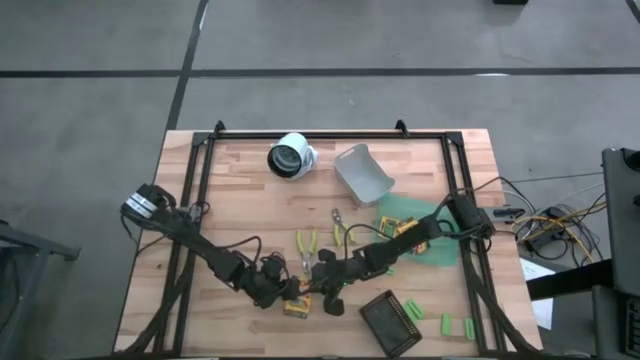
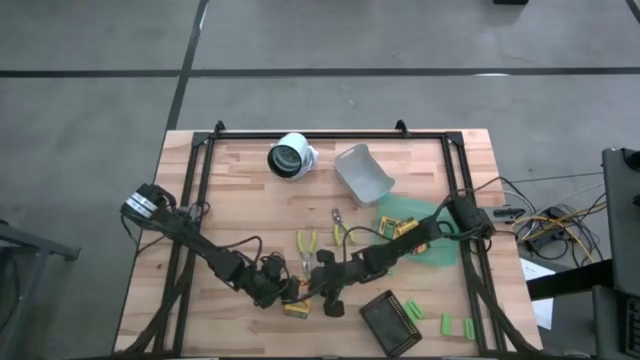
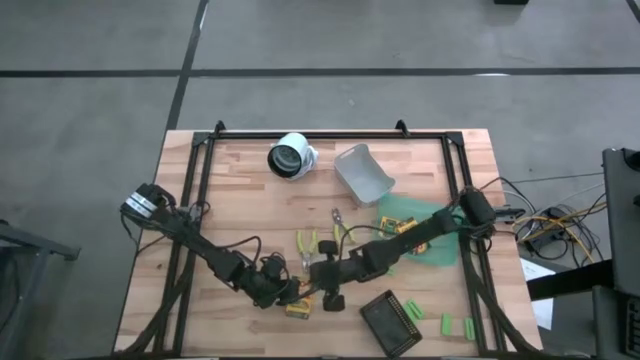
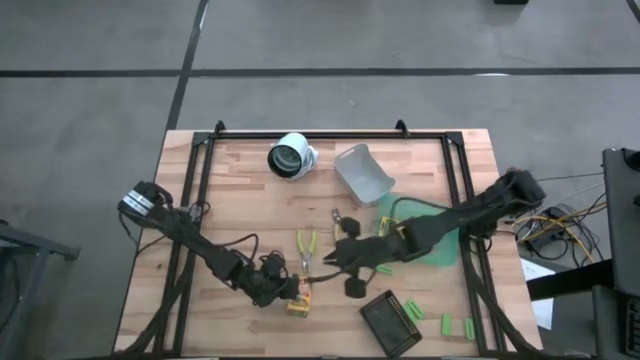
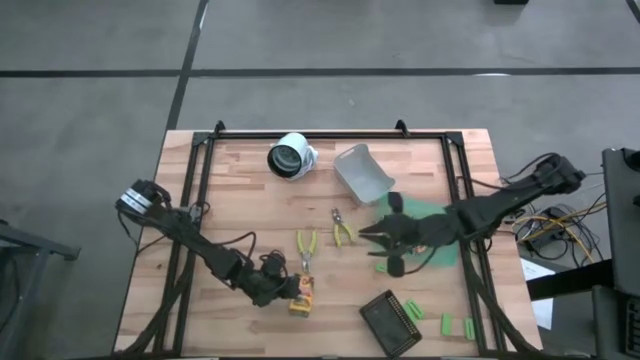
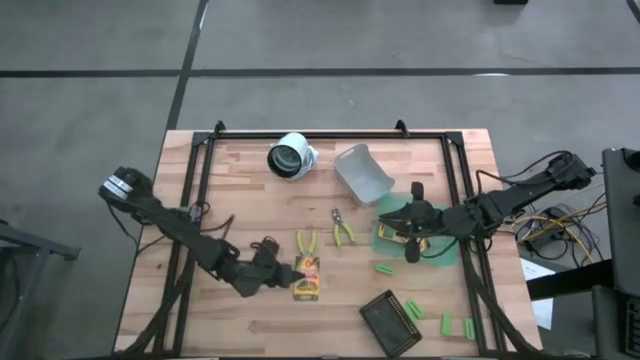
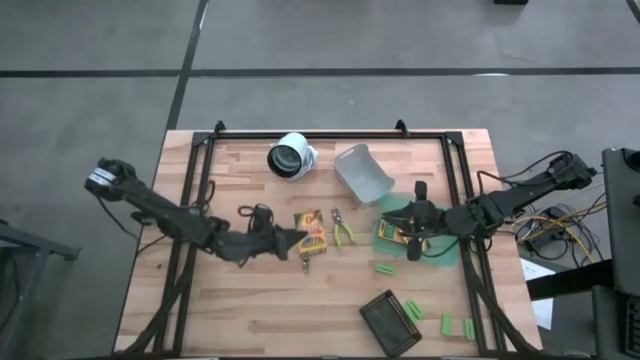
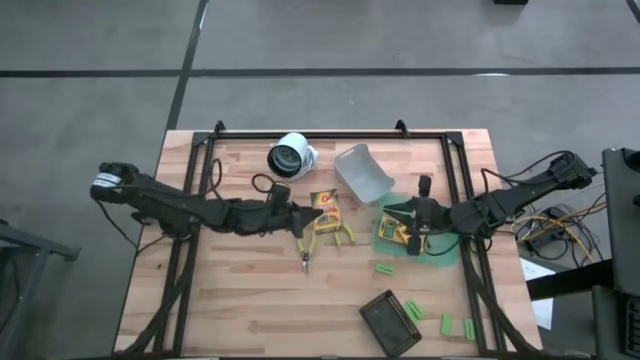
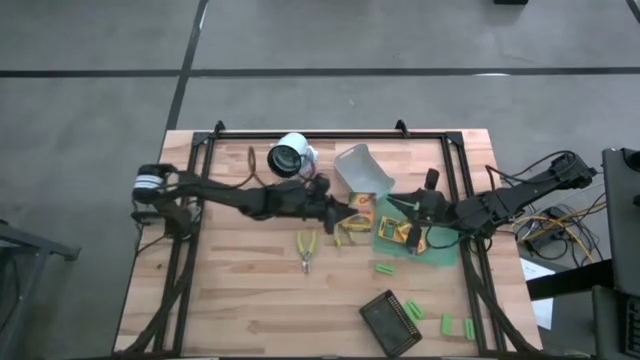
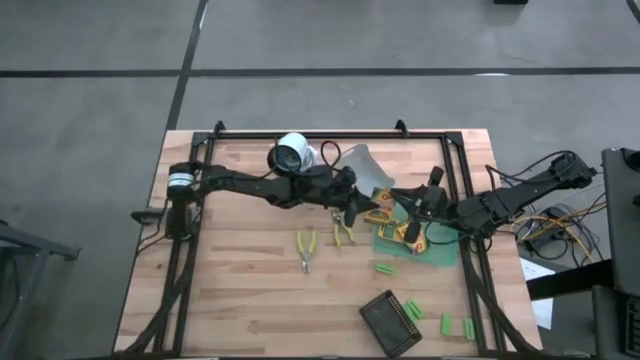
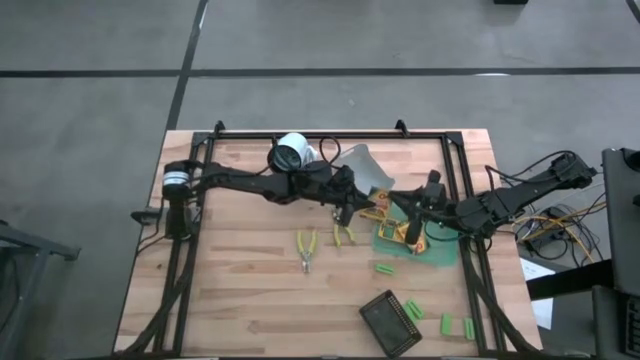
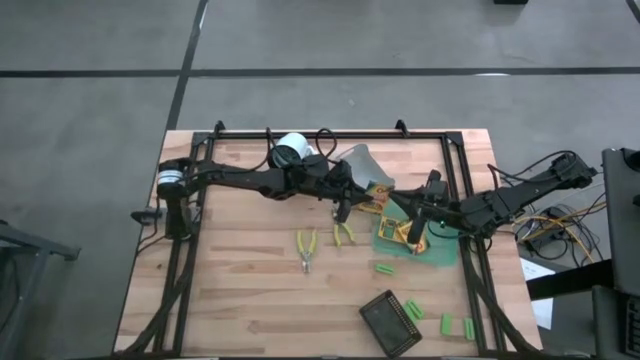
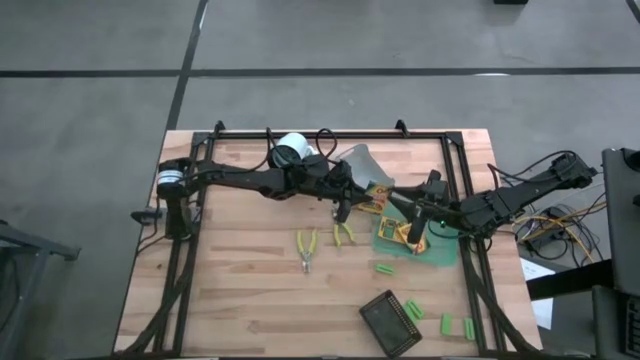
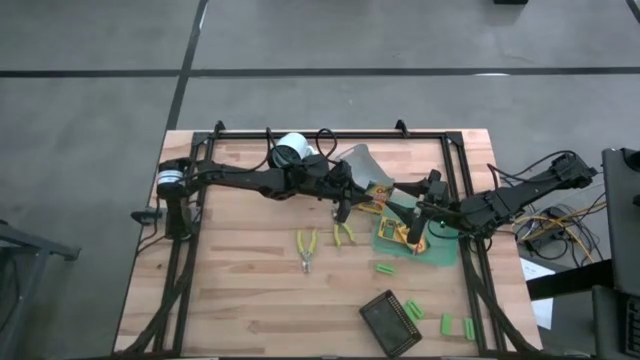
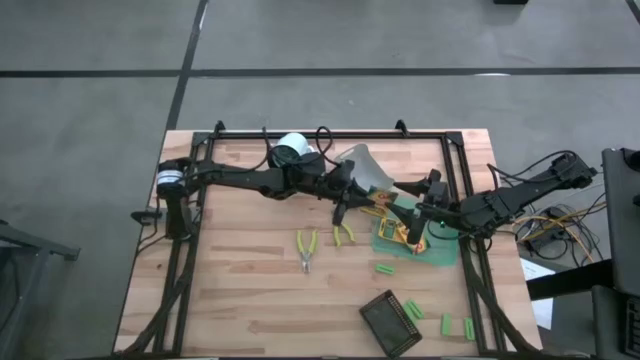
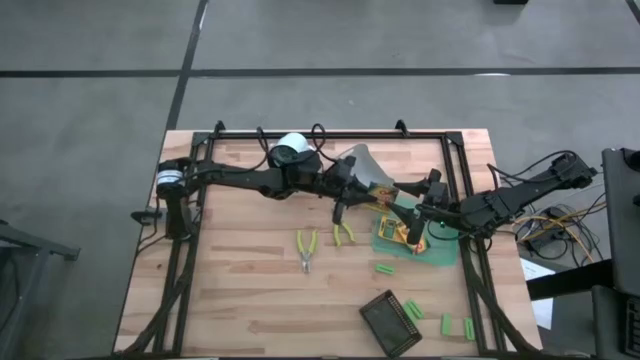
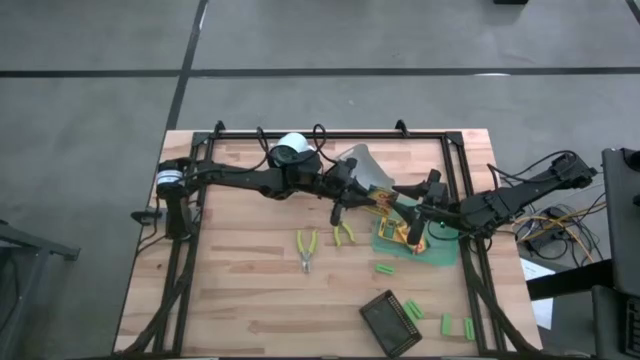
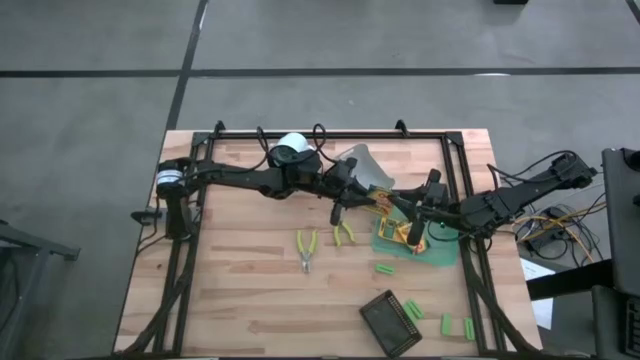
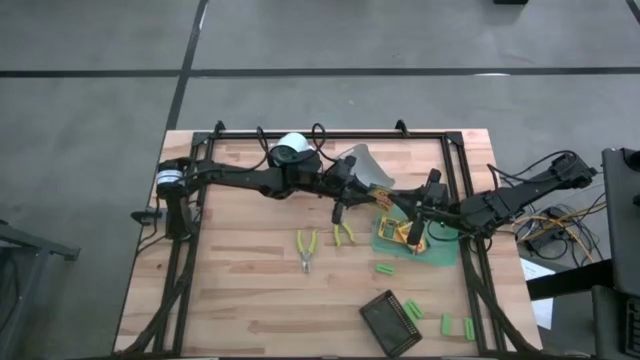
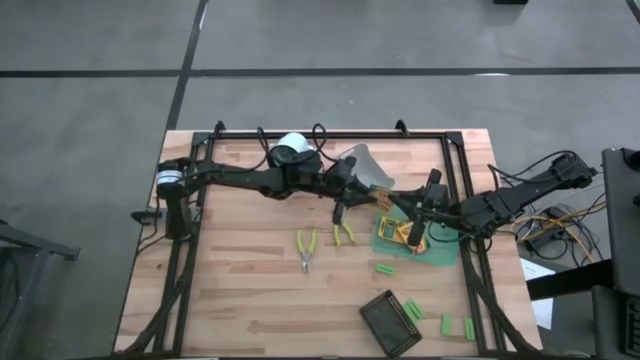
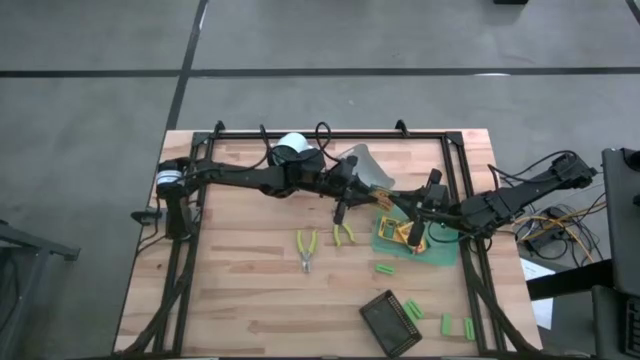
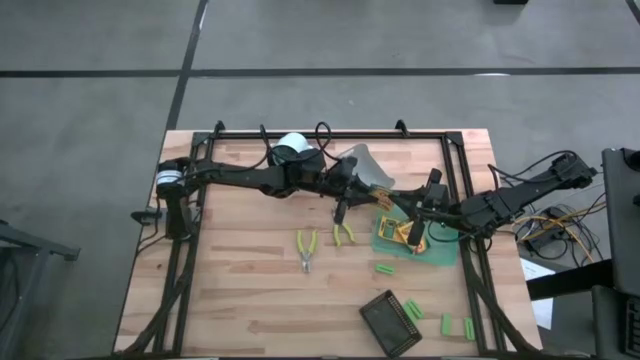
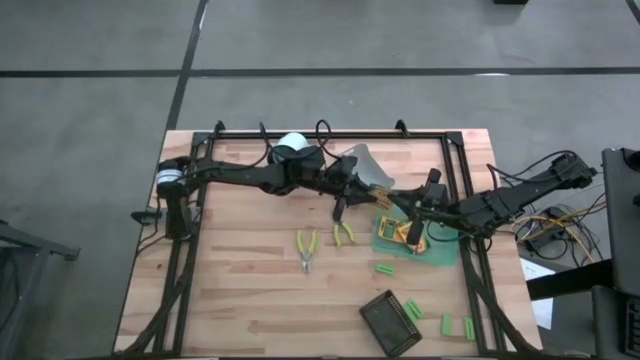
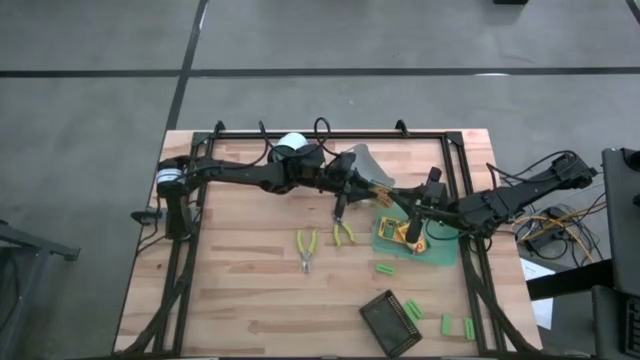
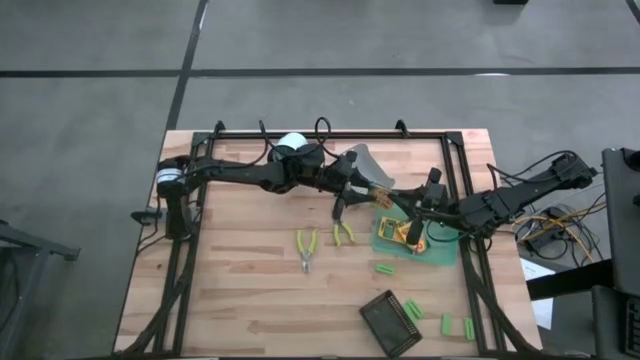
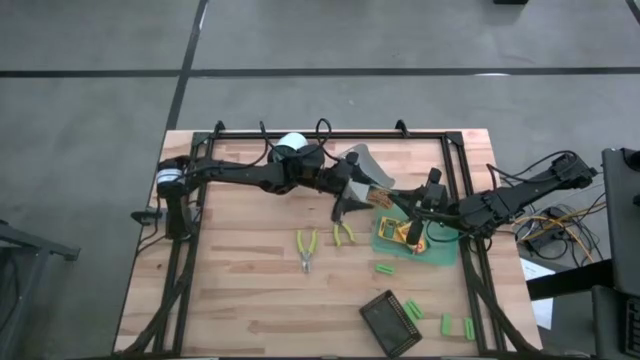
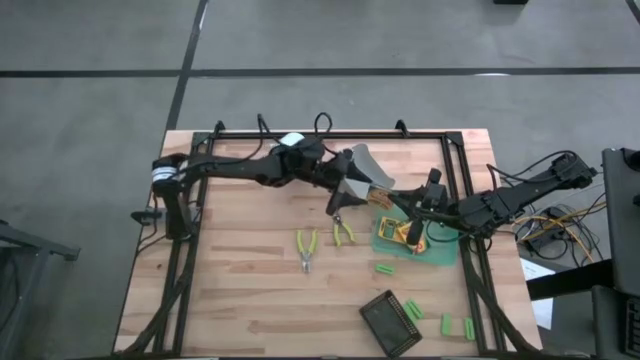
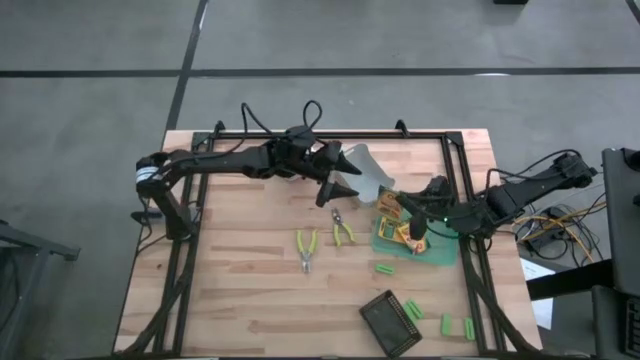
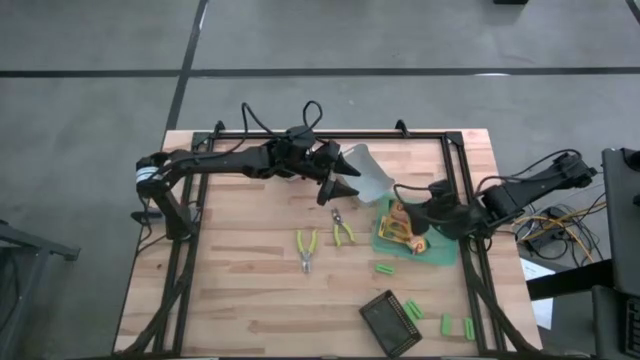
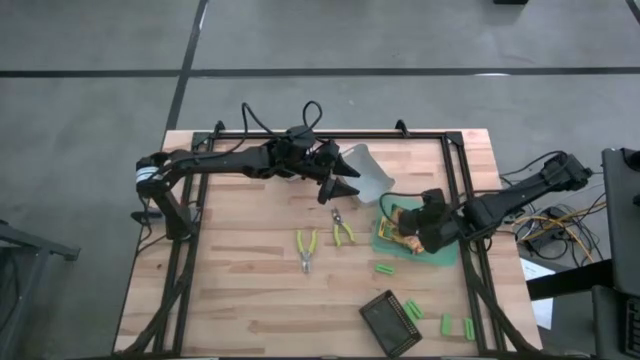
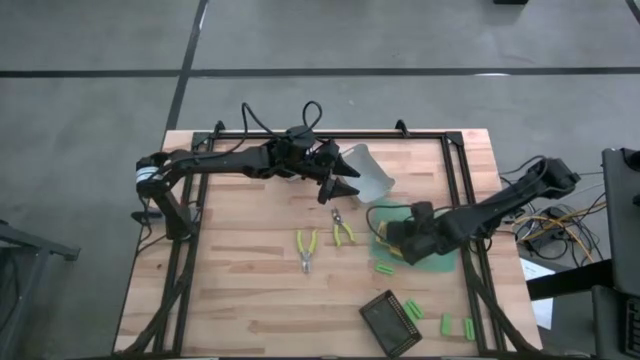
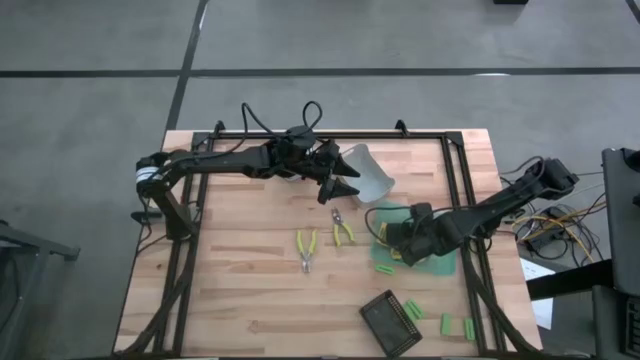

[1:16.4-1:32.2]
Task: Pick & Place School Supplies
Put the yellow crayon box into the green bin

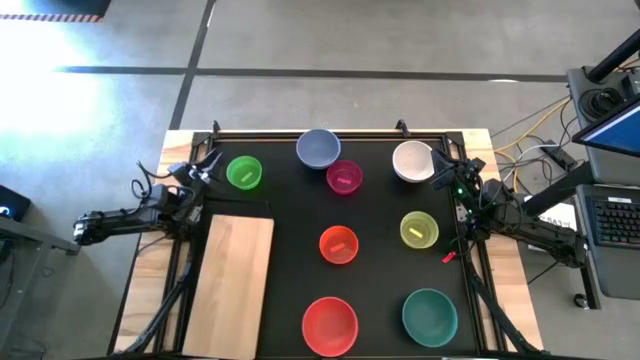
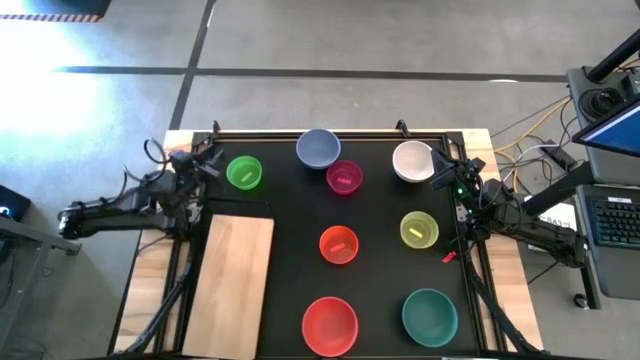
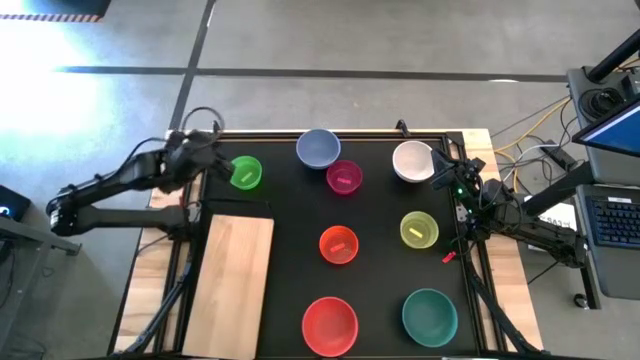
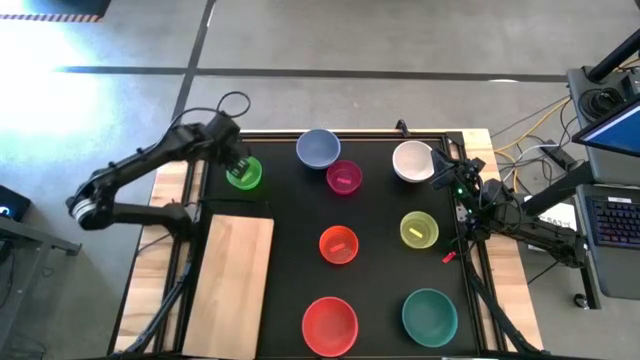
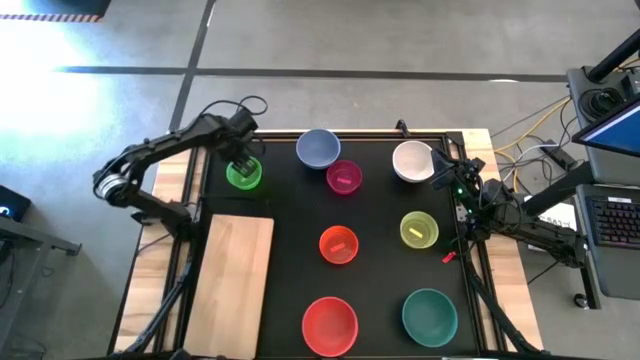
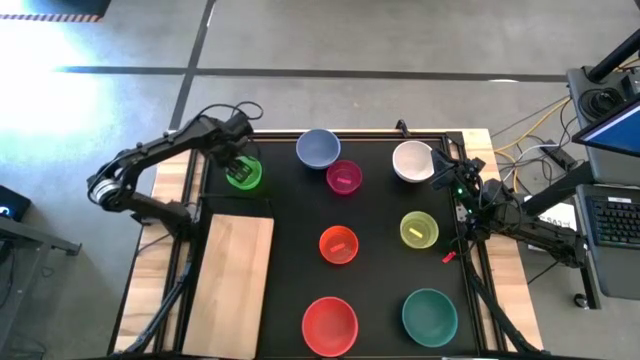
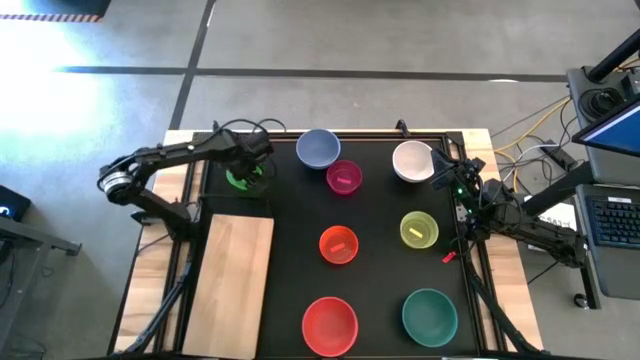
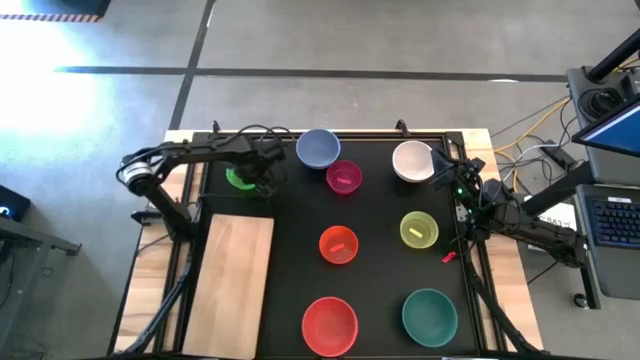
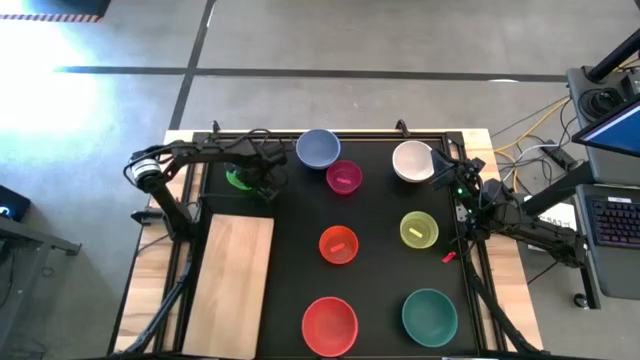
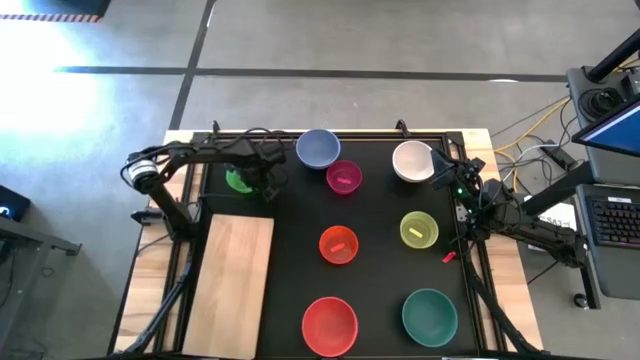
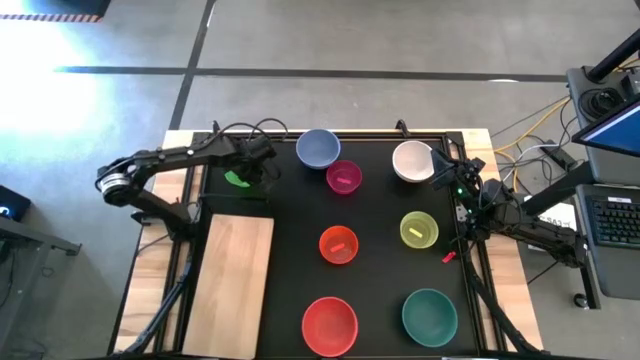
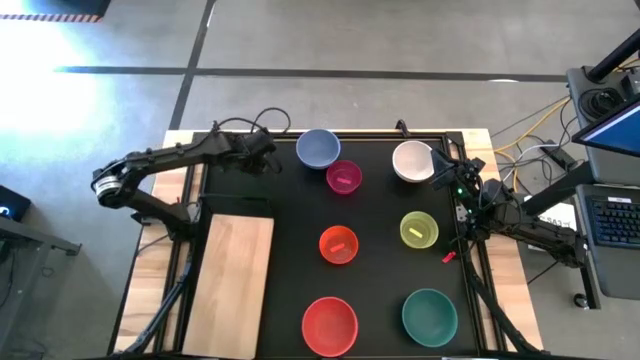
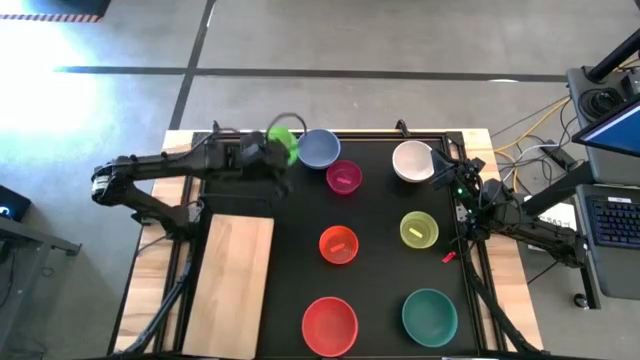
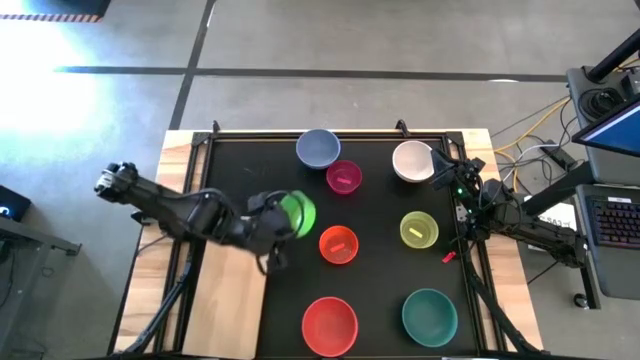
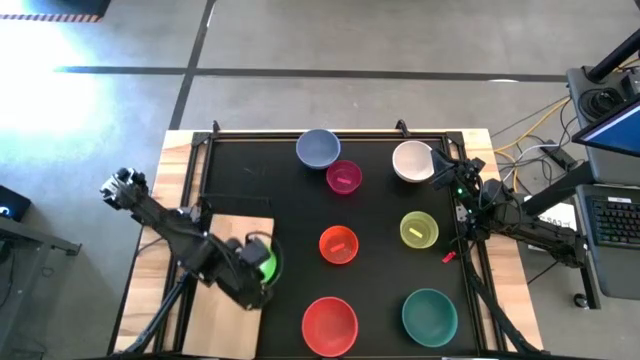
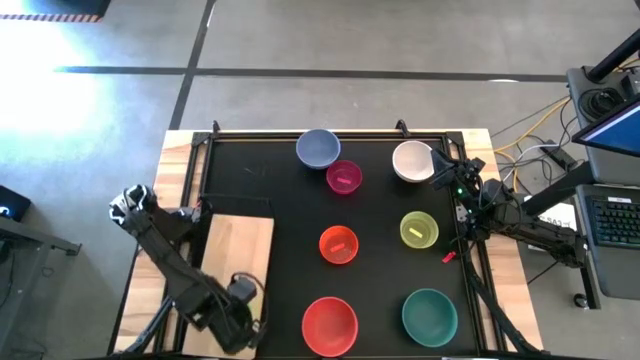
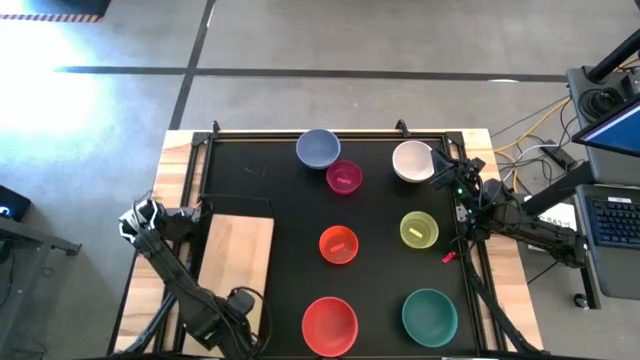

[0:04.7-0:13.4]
Task: Place and stack bowls onto a shelf
Put the light green bowl on the shelf
